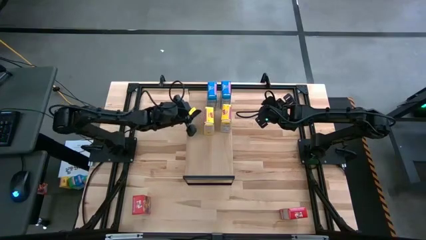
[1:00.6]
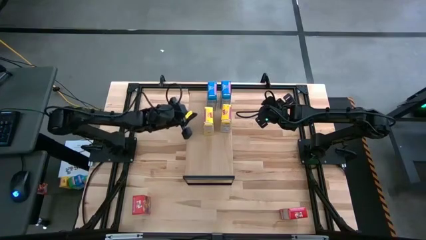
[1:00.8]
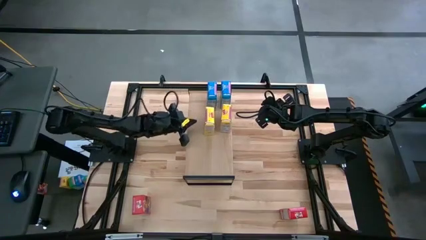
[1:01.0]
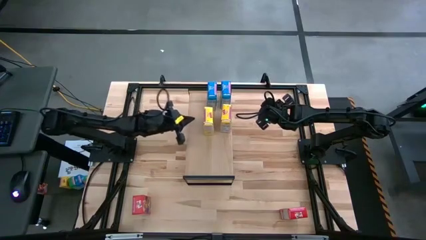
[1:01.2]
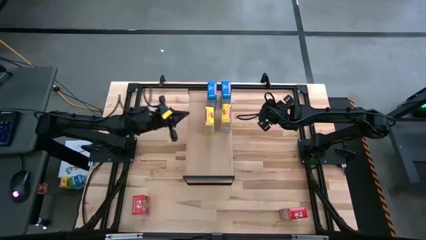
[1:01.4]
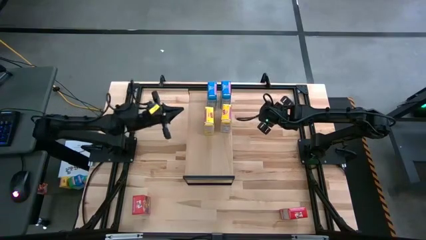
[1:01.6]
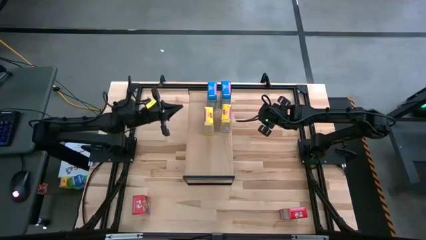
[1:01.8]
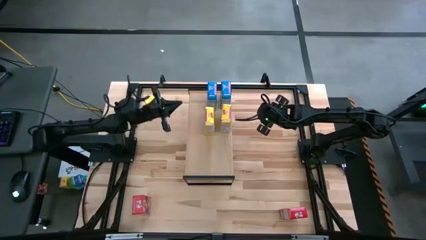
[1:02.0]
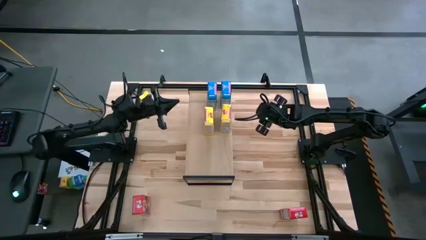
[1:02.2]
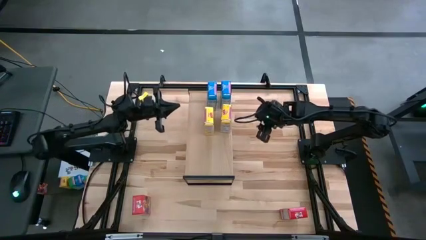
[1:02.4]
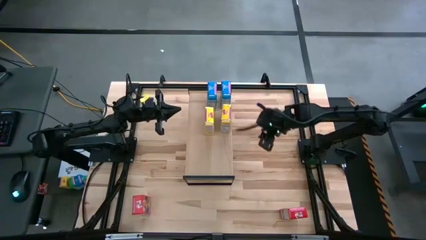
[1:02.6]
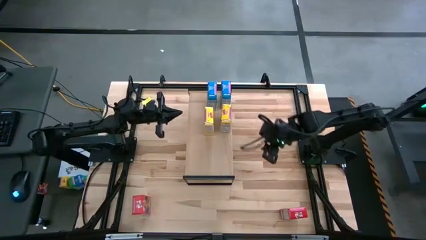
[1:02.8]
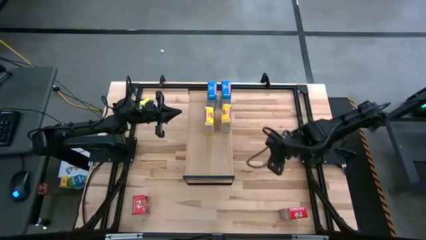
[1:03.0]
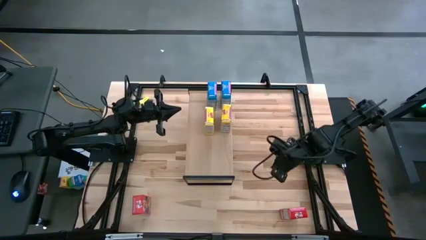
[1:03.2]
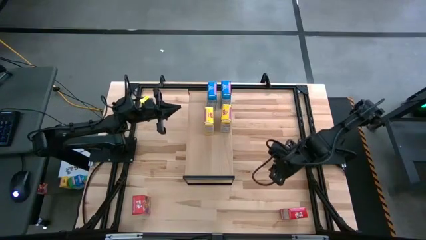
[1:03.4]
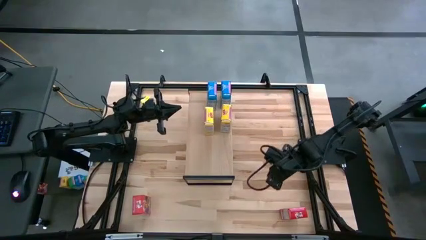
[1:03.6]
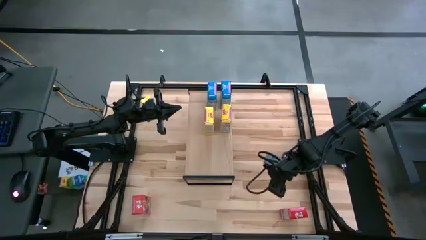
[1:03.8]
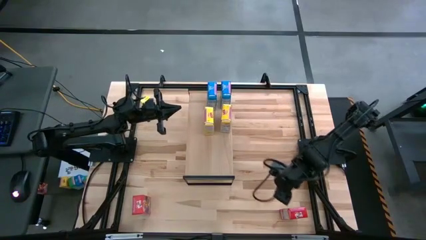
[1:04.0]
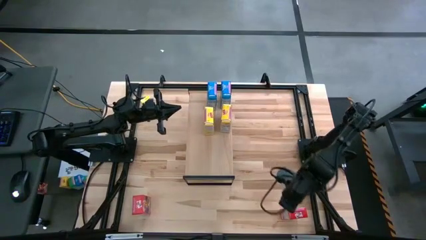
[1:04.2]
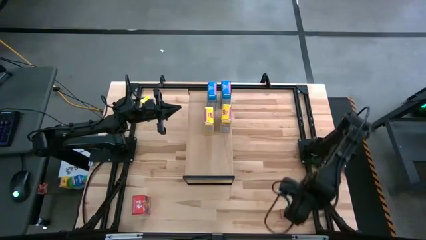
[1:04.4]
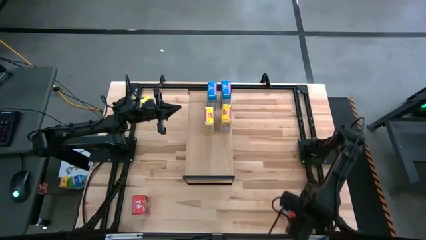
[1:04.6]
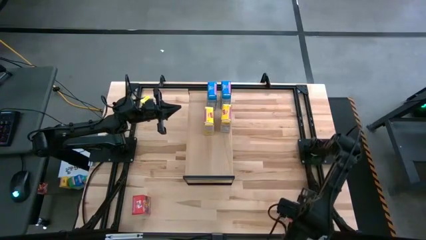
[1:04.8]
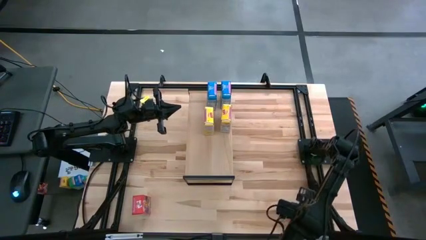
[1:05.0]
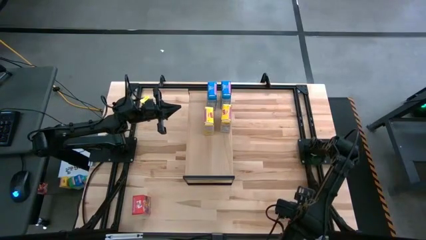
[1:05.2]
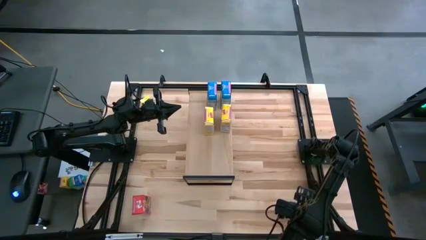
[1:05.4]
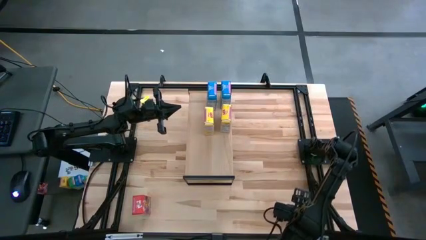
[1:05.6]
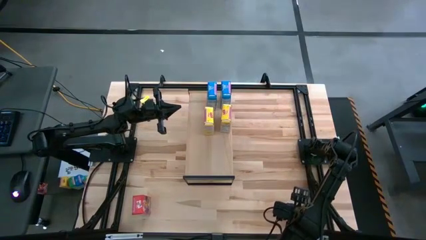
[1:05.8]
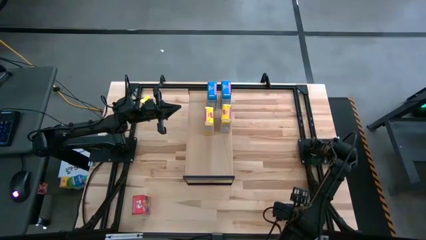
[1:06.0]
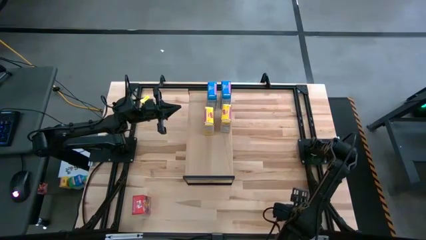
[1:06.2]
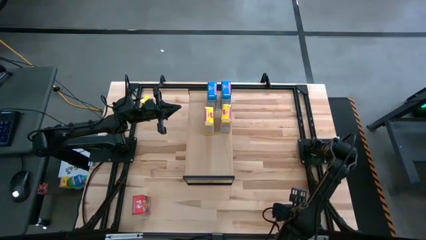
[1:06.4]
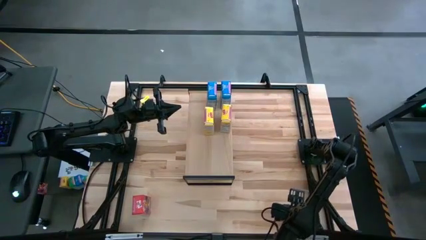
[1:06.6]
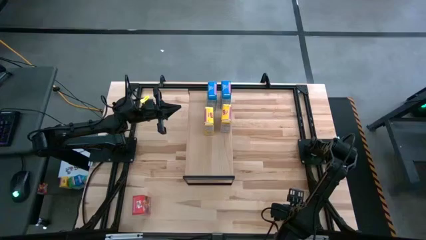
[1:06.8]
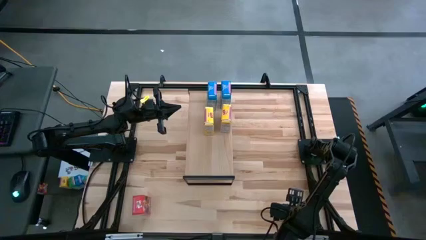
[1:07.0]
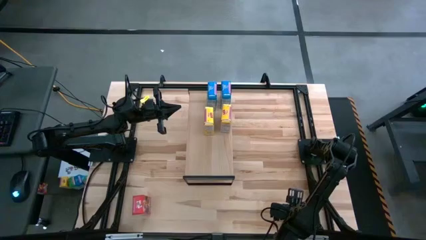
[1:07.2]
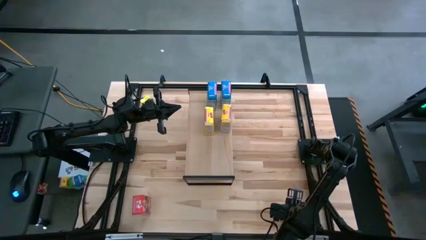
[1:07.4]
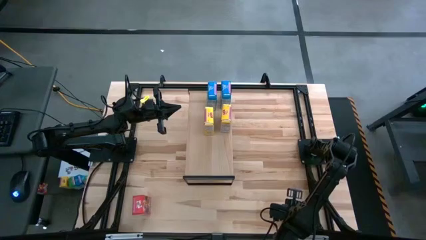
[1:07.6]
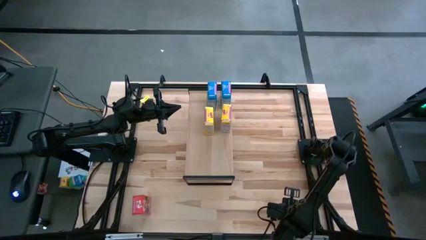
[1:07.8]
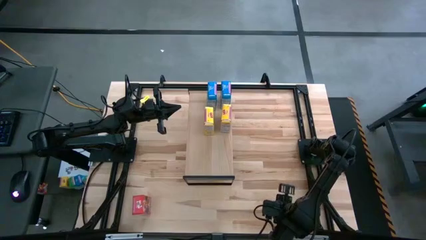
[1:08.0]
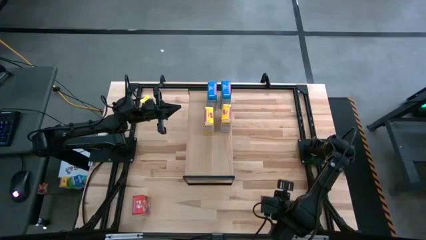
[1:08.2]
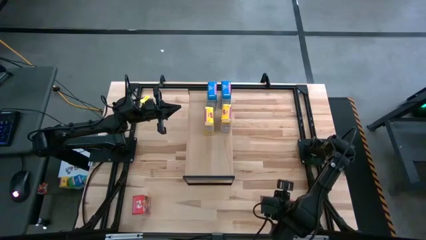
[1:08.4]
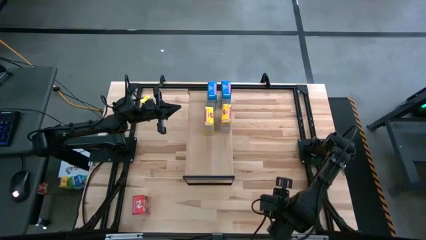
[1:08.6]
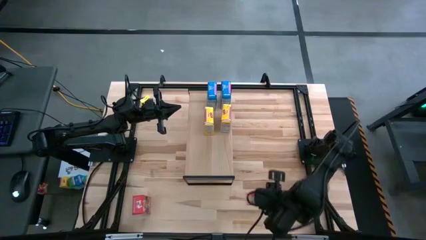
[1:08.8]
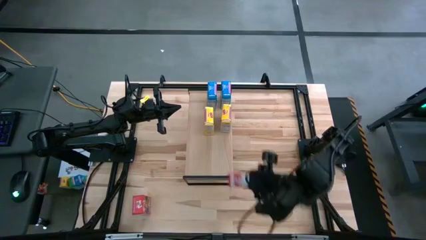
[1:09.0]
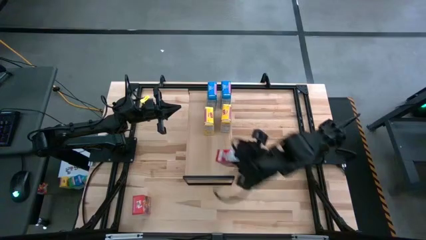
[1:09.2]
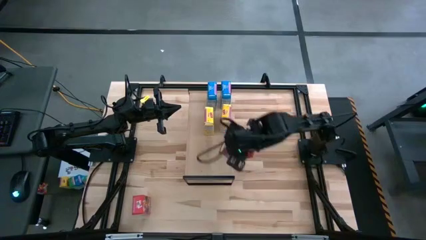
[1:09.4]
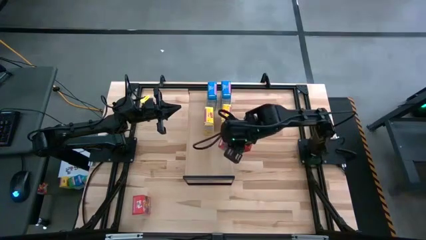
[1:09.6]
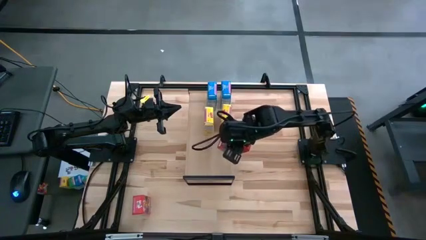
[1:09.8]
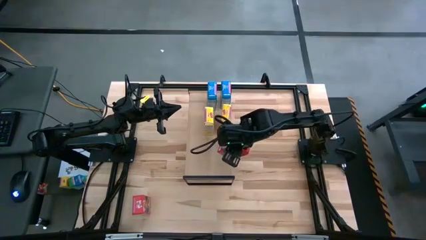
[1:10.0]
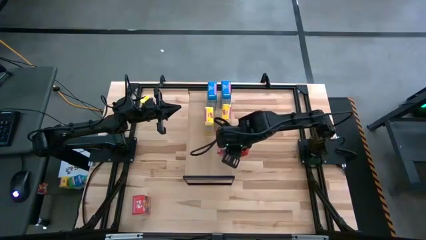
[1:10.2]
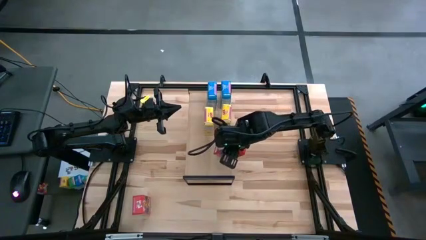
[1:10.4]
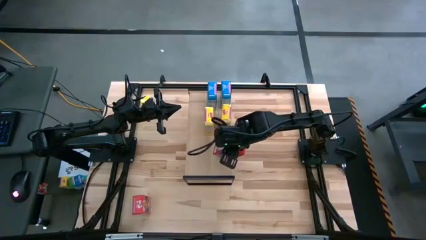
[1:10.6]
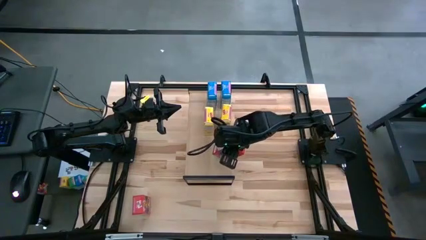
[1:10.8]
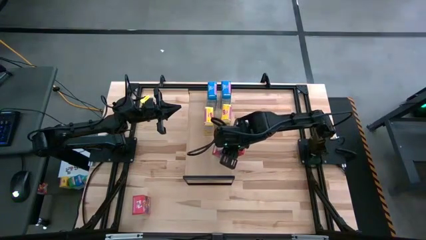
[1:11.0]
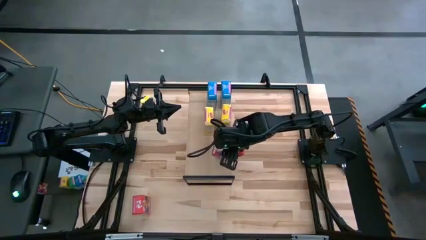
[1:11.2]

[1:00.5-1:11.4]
Task: Stack cereal on shelf
Put the right red cereal box on the shelf

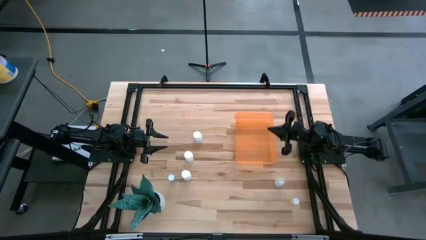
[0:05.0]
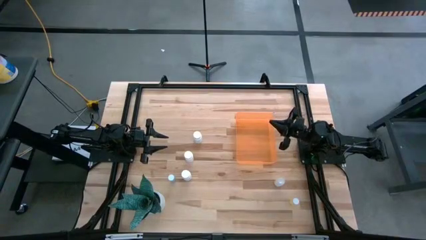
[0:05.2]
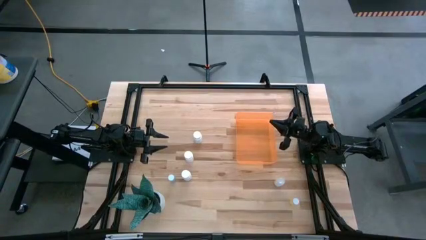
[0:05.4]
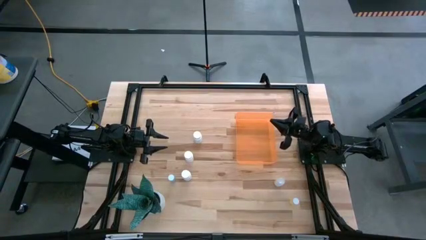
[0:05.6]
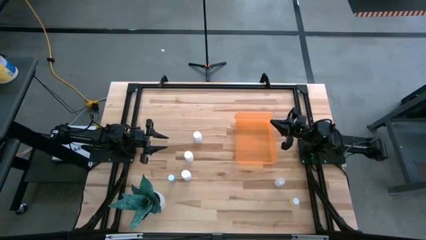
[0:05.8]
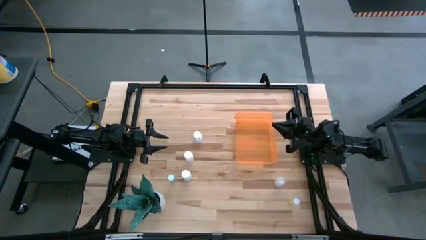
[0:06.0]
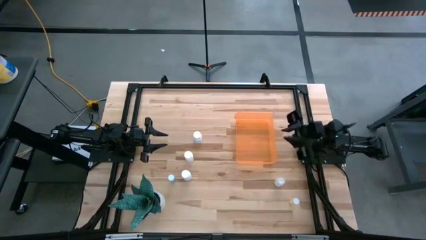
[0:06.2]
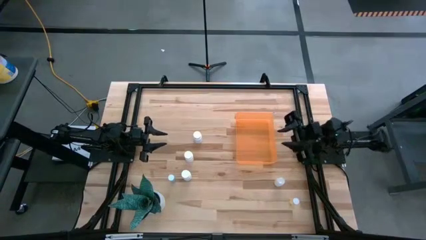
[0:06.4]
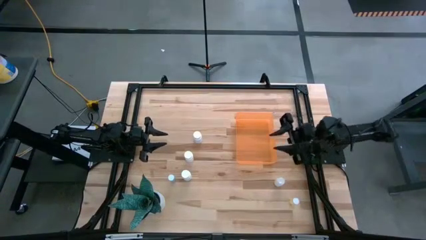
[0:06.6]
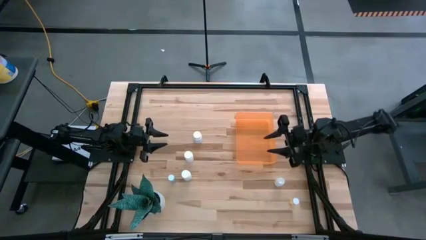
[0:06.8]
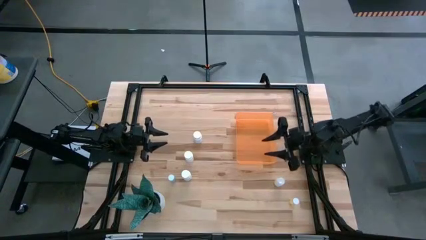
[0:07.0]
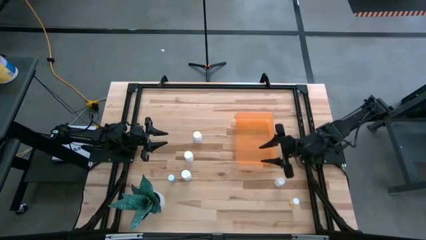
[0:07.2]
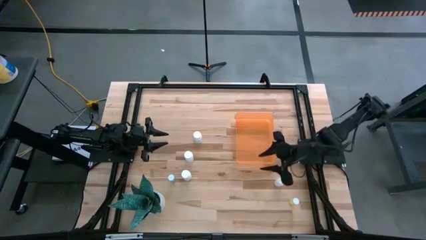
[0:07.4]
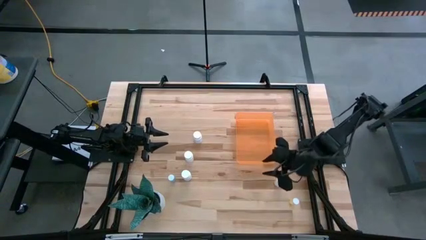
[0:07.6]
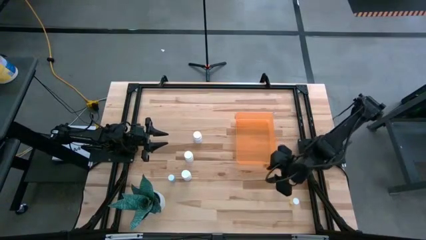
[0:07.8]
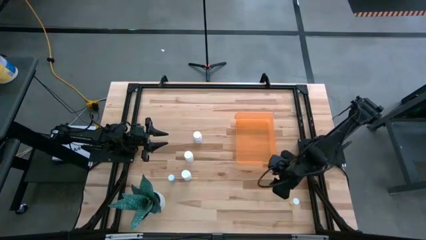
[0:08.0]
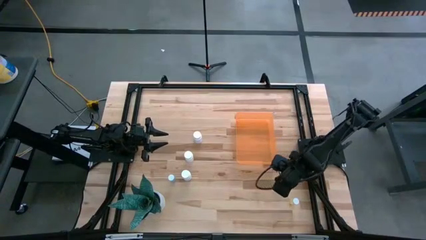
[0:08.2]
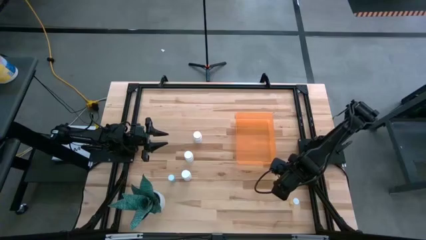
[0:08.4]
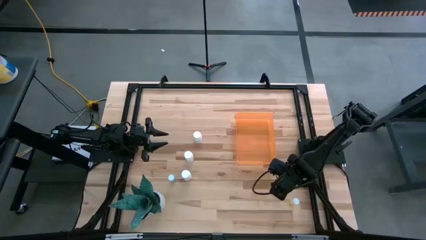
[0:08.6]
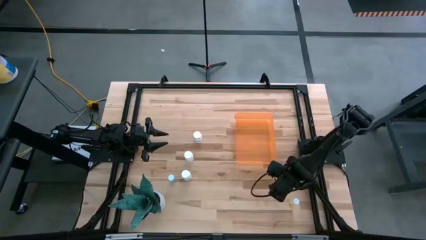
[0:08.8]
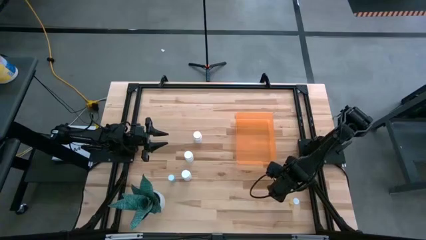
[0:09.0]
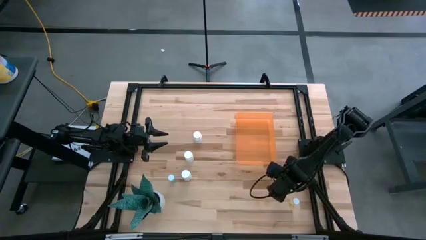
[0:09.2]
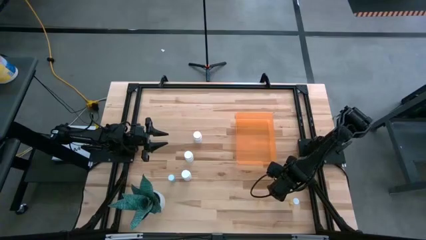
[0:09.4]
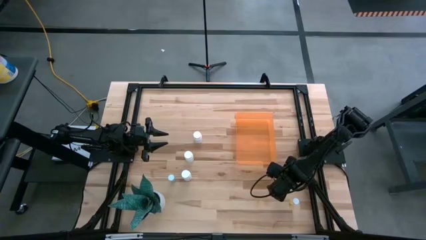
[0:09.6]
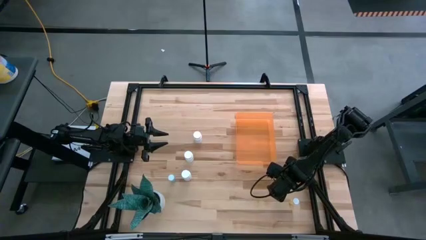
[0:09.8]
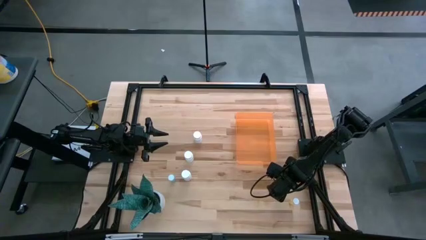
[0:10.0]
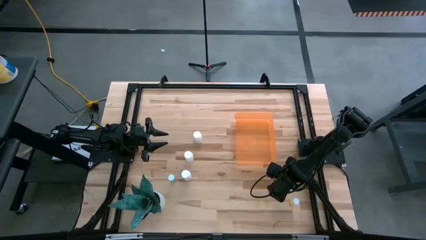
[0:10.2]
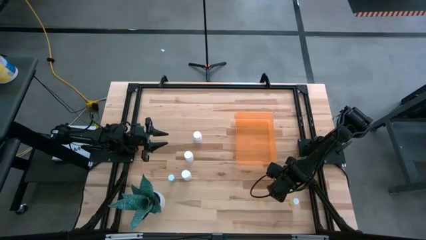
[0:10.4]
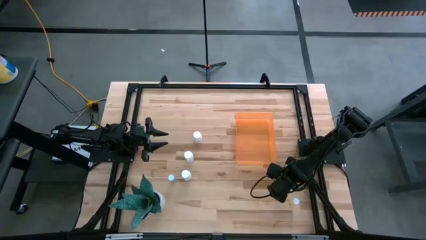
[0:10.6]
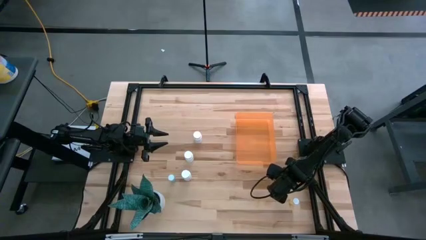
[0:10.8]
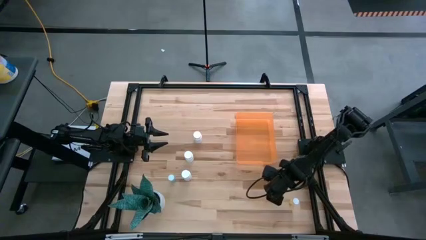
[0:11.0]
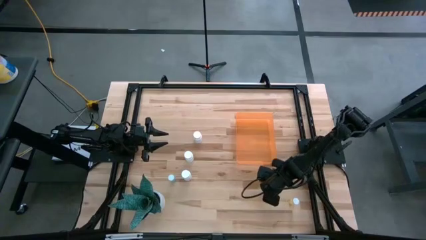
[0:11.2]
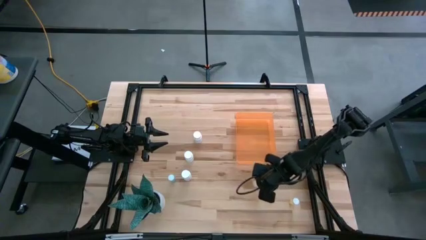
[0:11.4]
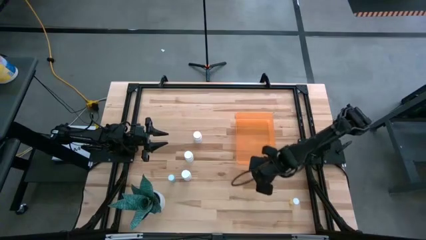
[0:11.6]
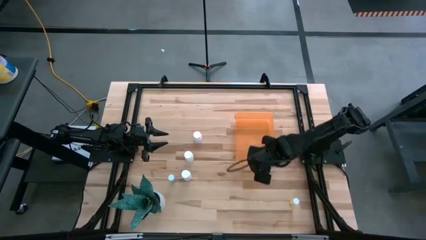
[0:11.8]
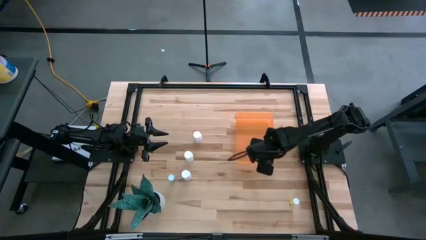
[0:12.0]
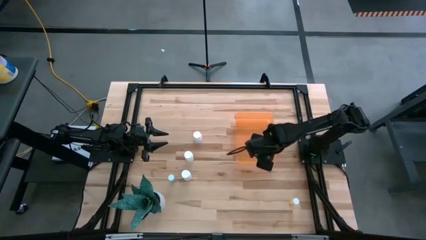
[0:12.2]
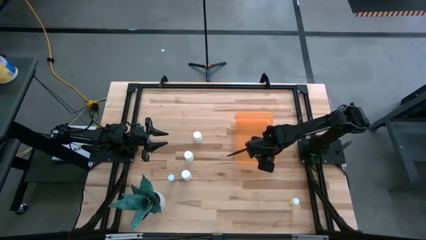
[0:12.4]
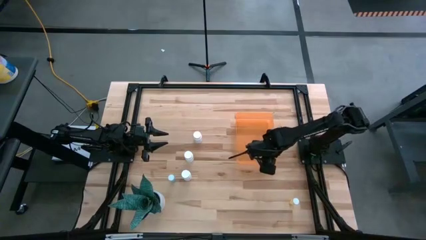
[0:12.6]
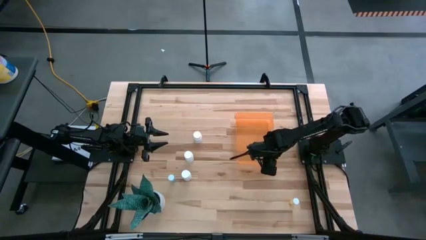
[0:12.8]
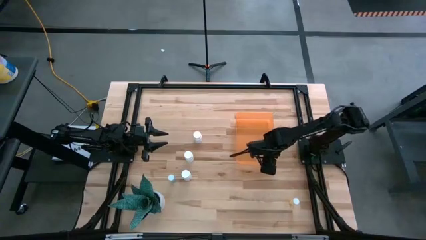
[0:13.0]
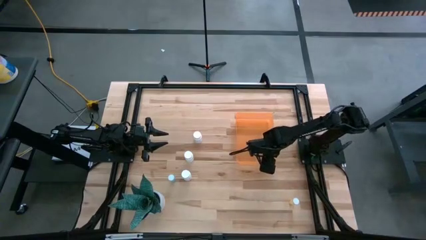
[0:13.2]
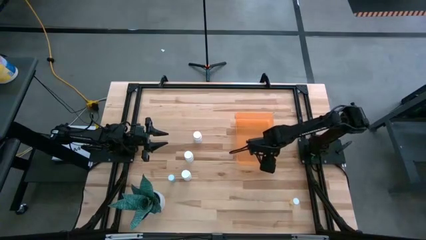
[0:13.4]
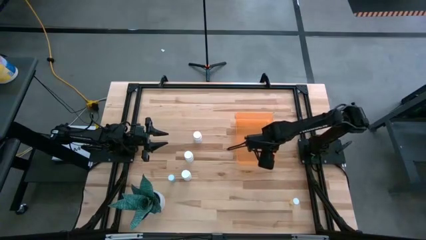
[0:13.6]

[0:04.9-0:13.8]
Task: Pick and place pill bottles into a basket
Put the white pill bottle into the orange container
